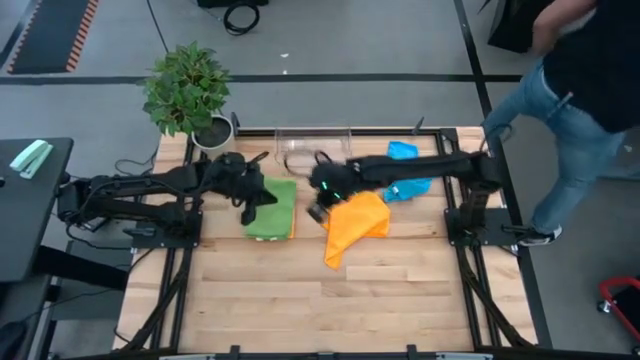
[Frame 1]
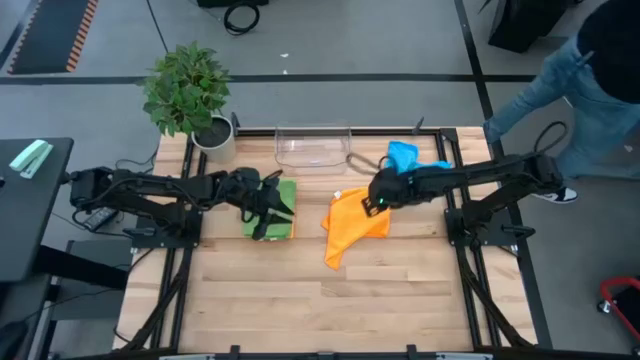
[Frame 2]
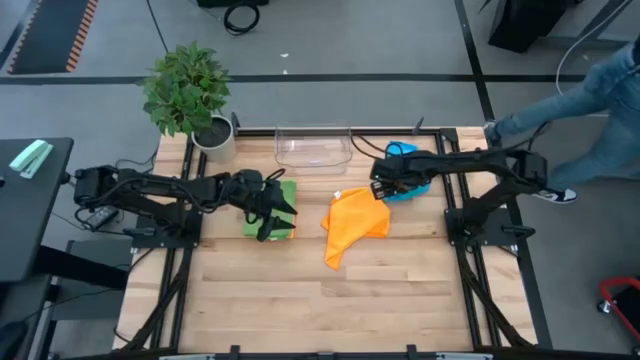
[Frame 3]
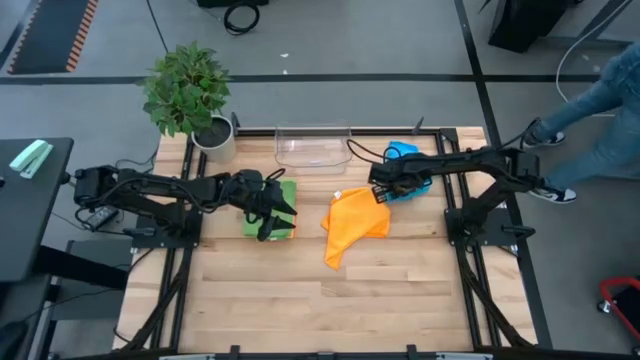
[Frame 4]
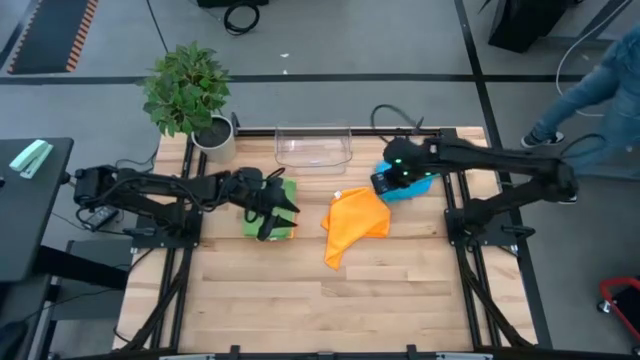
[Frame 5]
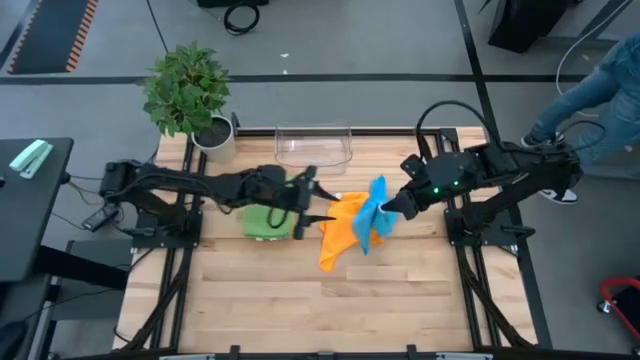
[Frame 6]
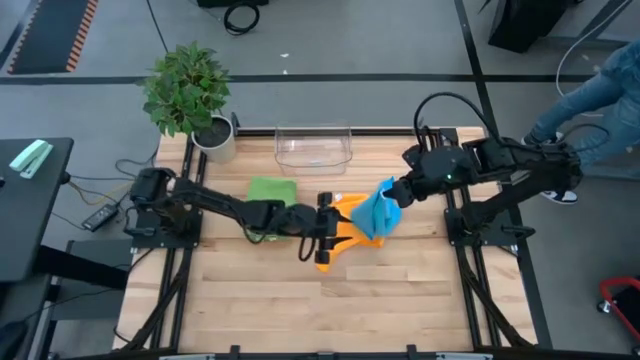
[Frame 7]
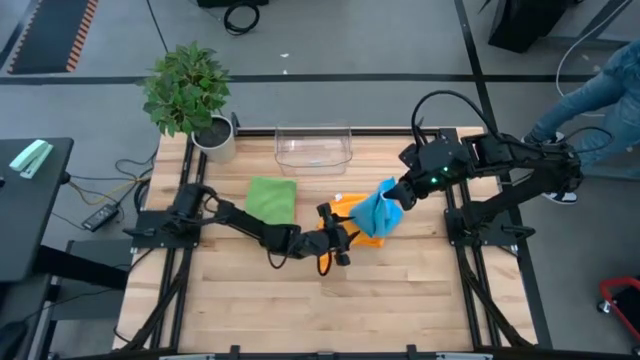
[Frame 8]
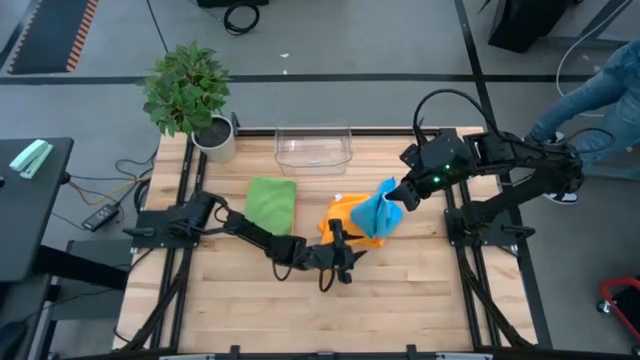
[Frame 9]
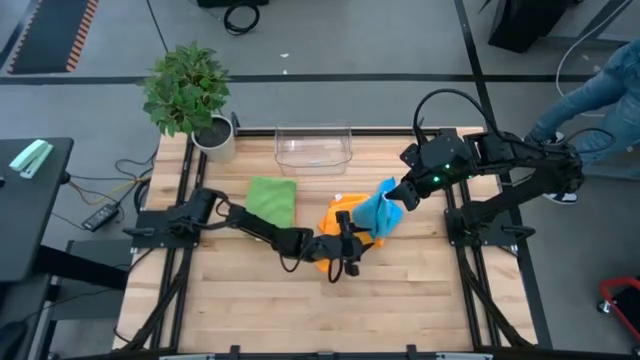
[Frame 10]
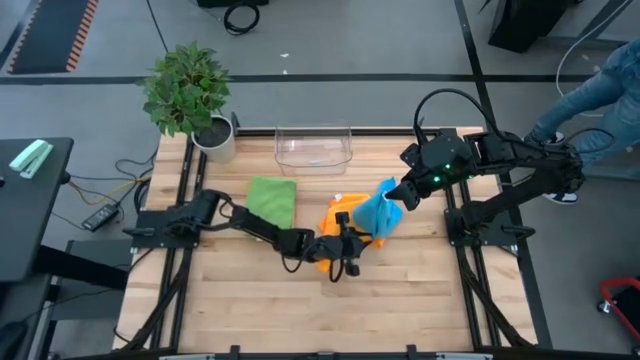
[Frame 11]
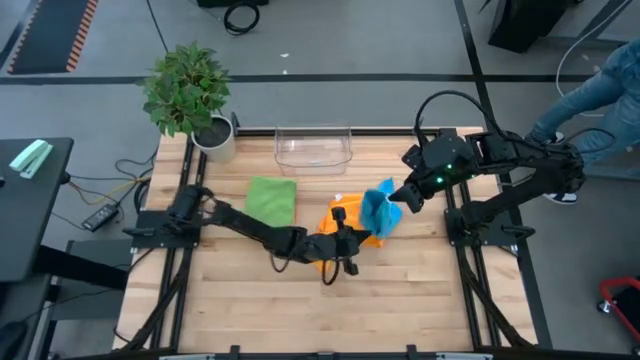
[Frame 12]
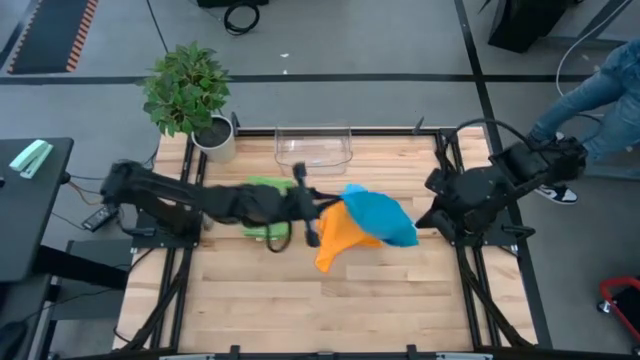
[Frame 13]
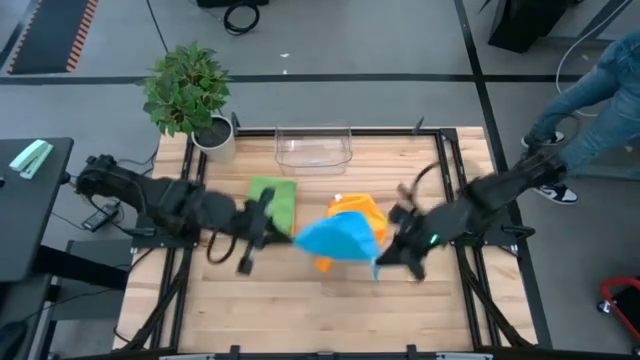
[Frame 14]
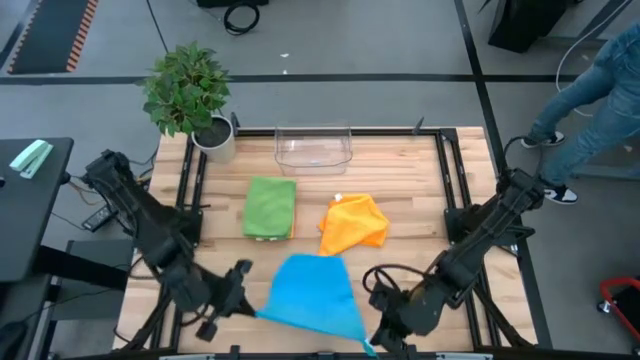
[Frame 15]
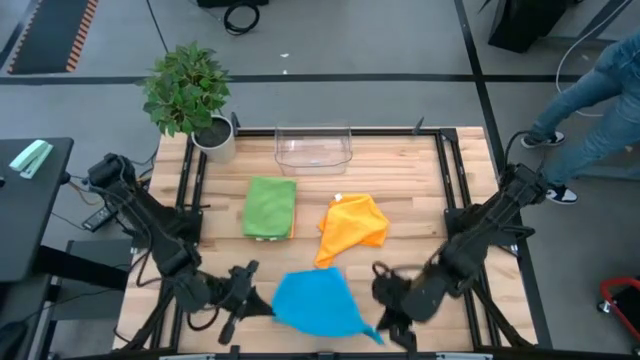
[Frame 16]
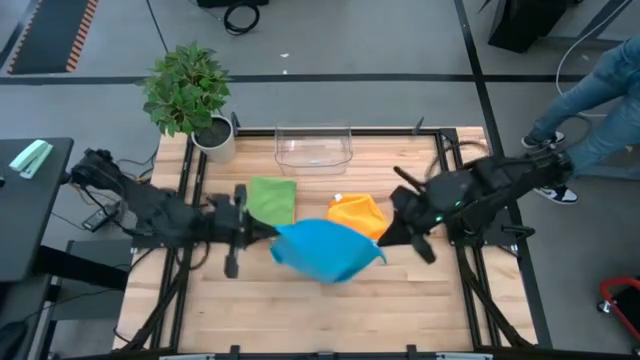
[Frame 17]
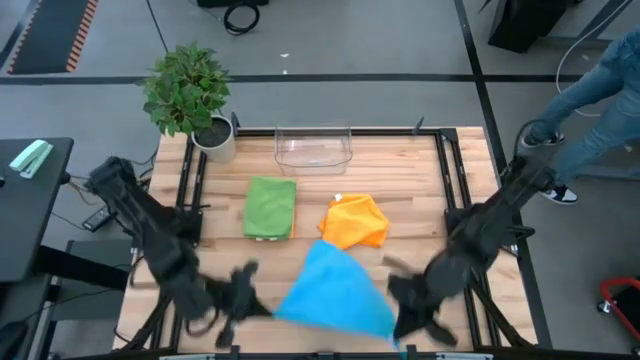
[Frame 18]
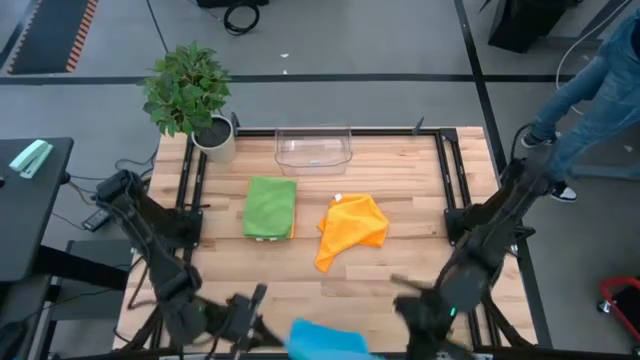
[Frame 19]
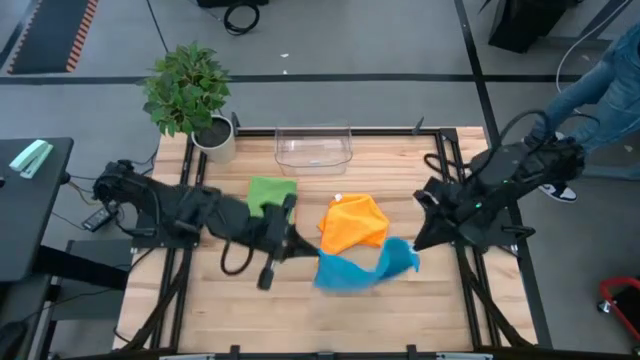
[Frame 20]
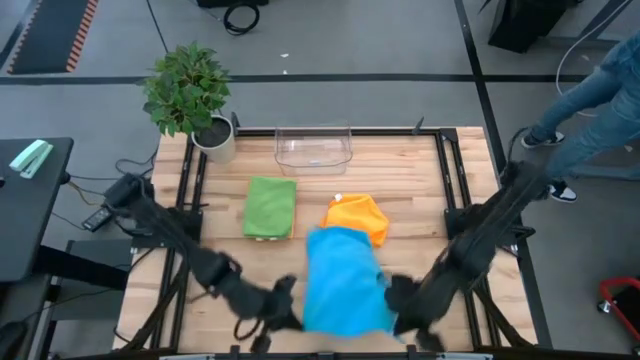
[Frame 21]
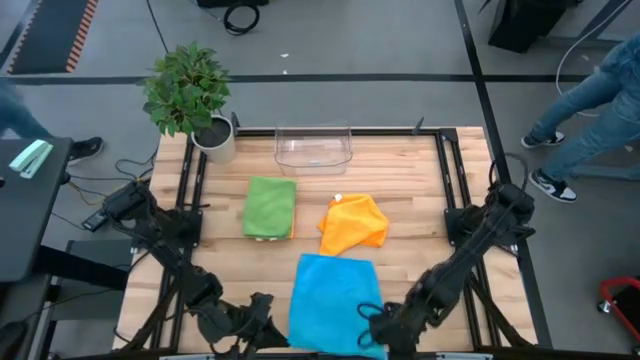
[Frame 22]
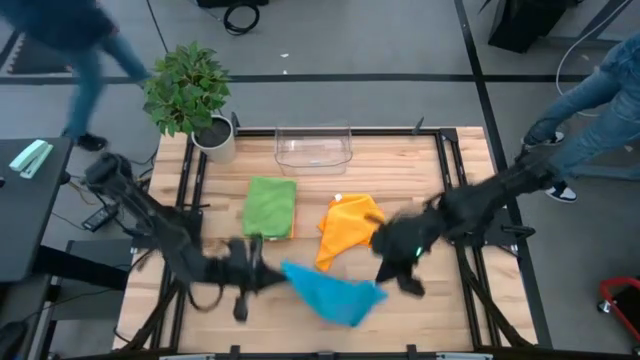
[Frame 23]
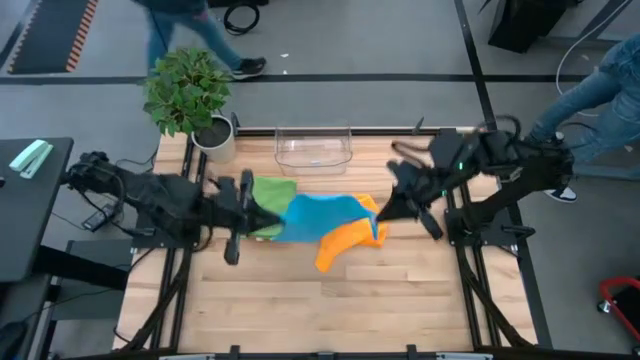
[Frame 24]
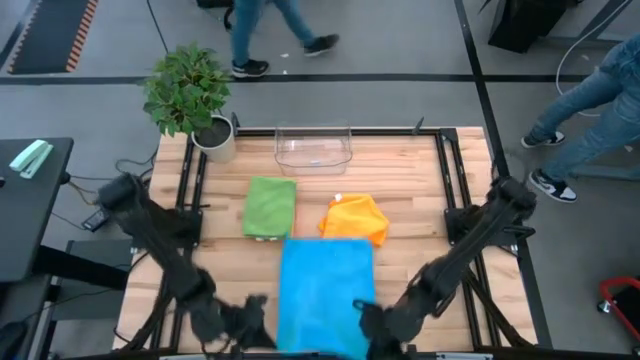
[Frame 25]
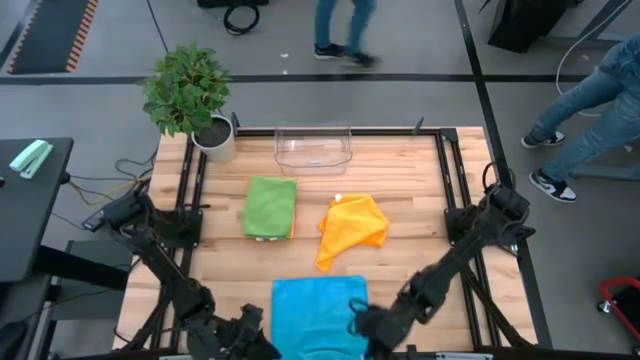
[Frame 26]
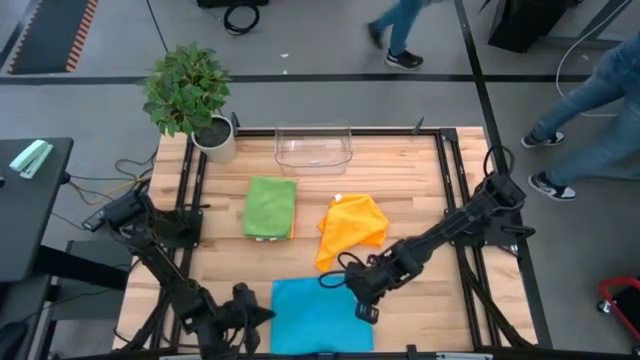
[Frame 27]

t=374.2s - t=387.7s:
Task: Fold microfiber towels
Fold the blue microfiber cloth

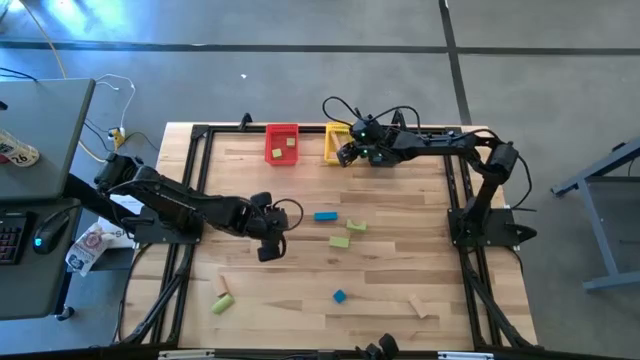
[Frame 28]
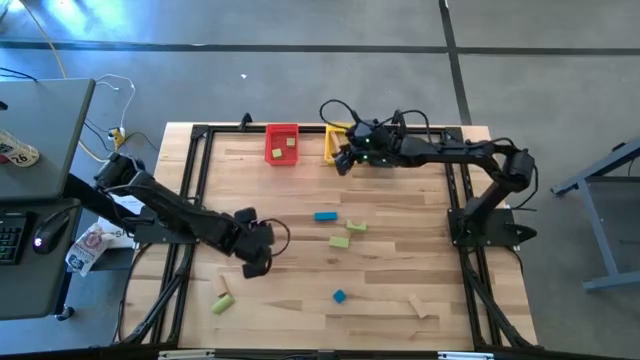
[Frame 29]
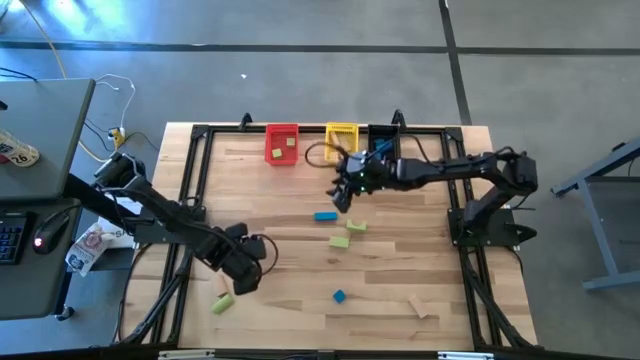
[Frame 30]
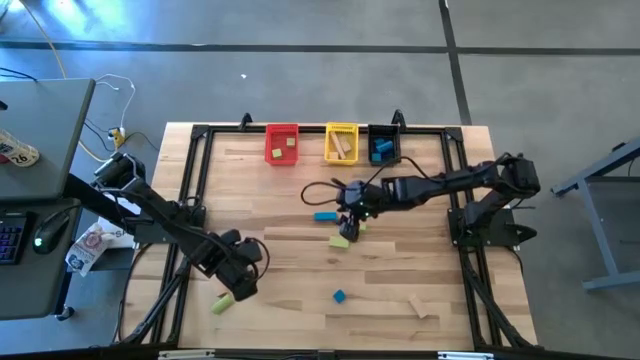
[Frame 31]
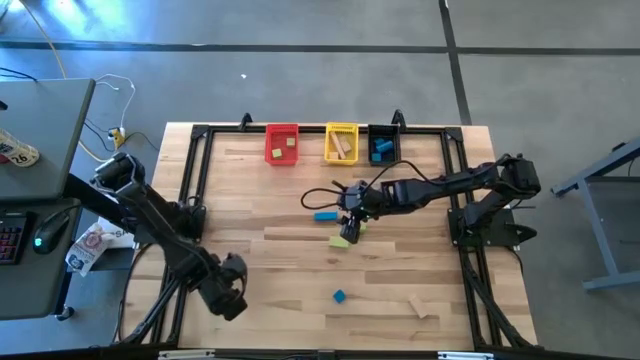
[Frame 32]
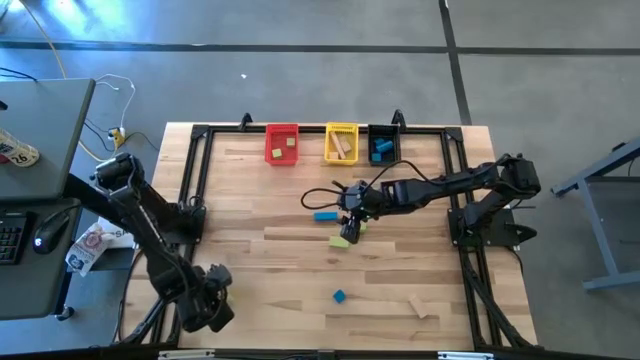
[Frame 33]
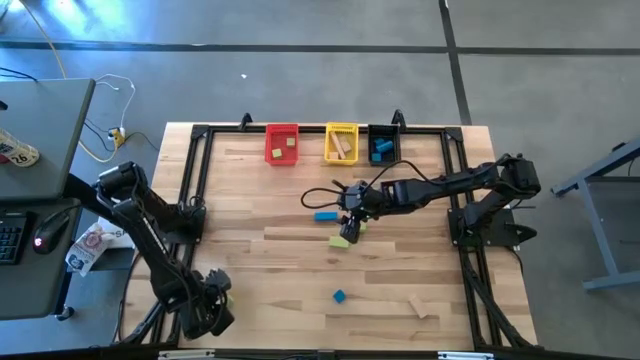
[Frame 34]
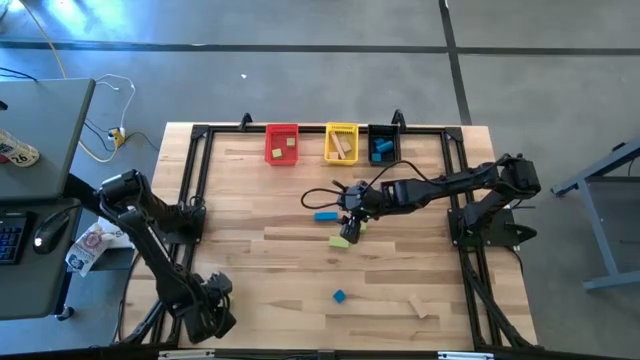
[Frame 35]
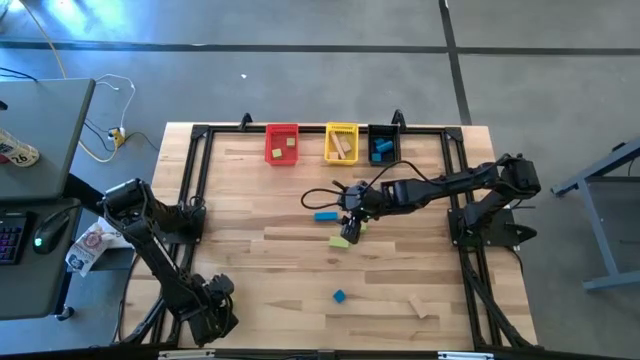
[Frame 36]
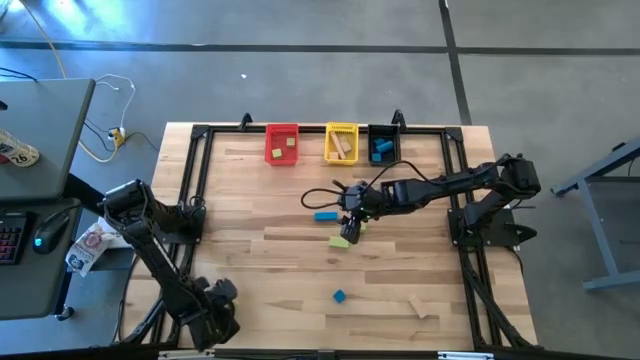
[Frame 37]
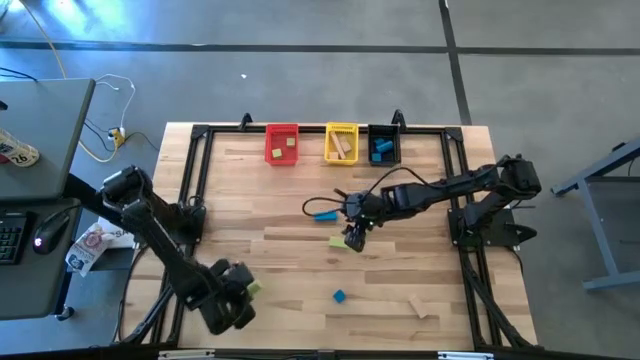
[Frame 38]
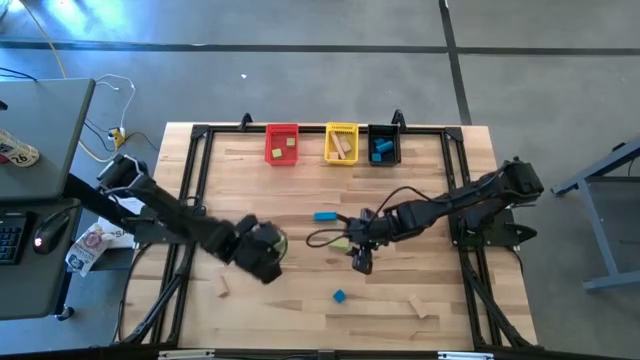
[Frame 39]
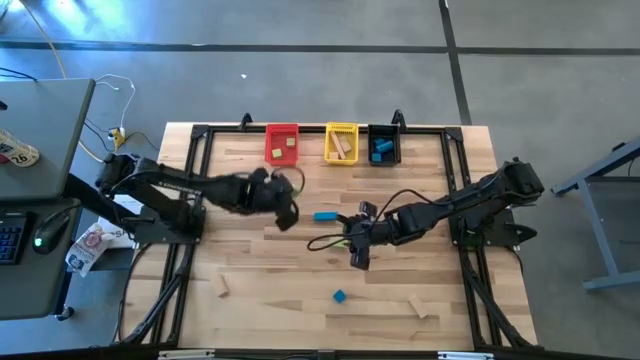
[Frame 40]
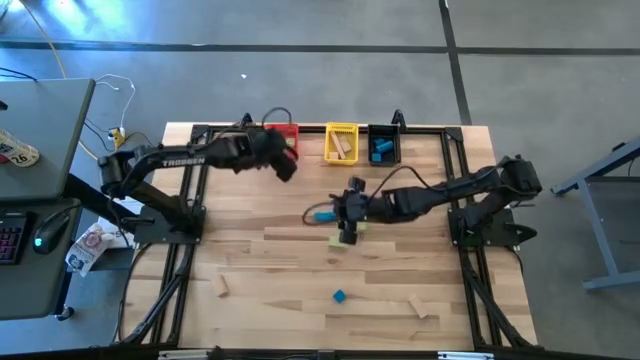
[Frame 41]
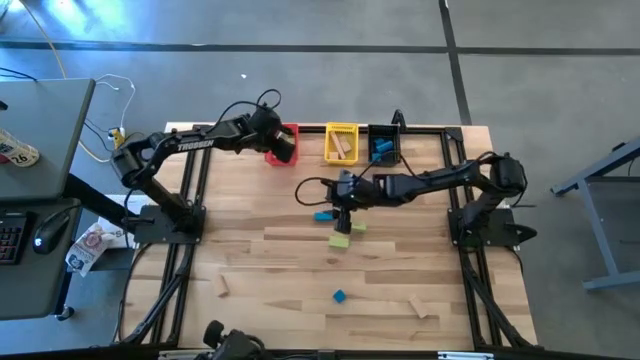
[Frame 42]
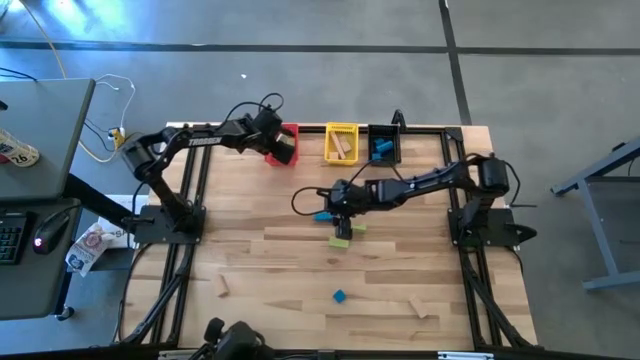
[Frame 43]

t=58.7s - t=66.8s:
Task: Sort & place blocks by color
Put the green block into the red bin

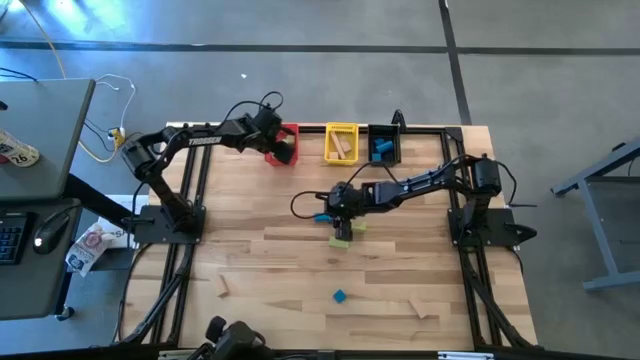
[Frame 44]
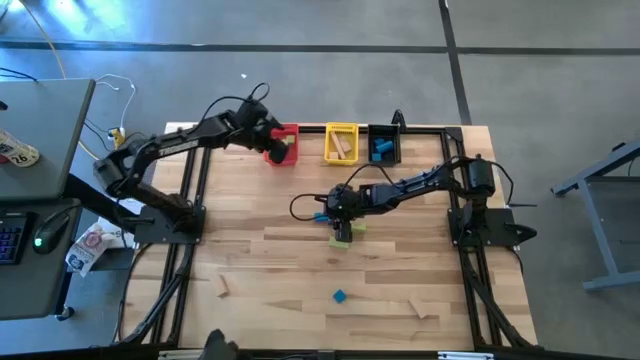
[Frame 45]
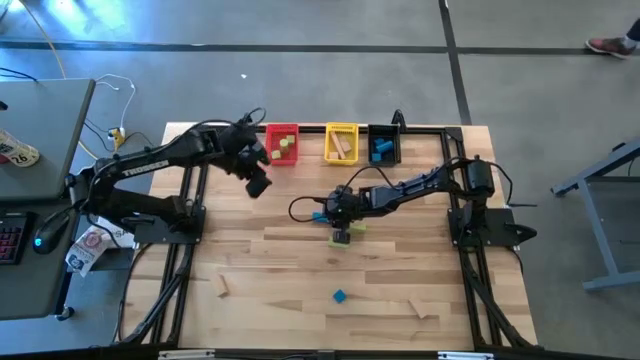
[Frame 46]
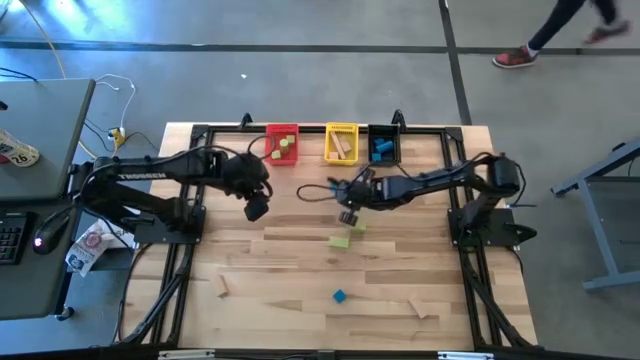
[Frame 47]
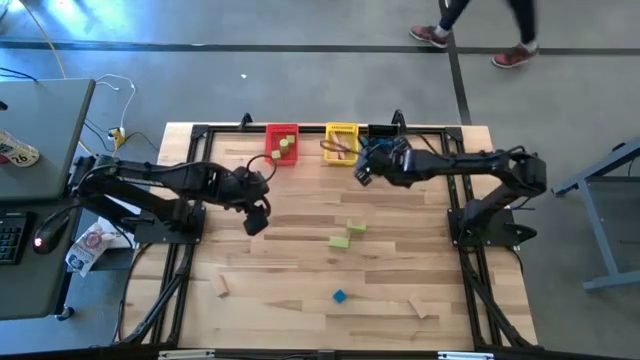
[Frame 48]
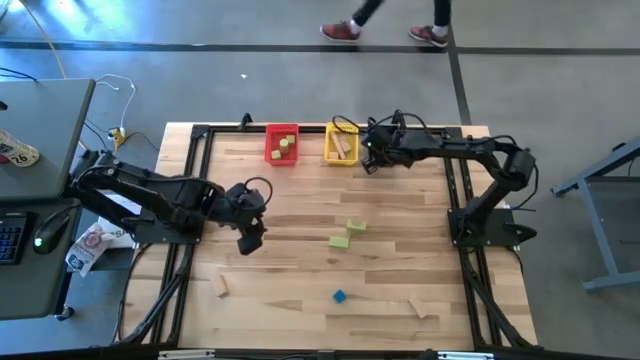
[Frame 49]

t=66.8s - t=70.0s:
Put the blue block into the black bin
